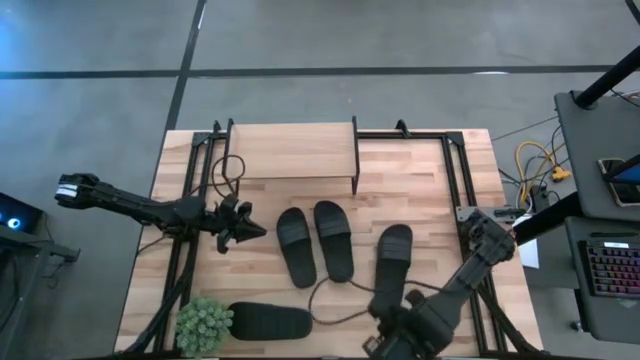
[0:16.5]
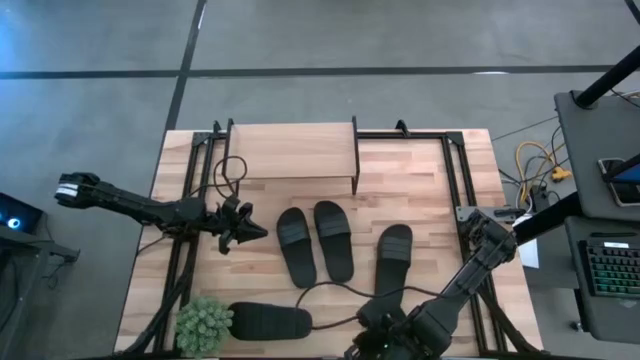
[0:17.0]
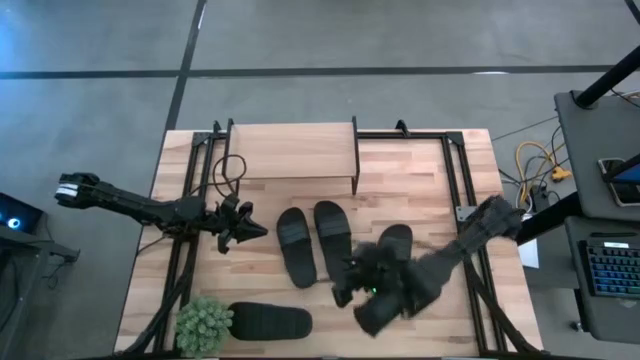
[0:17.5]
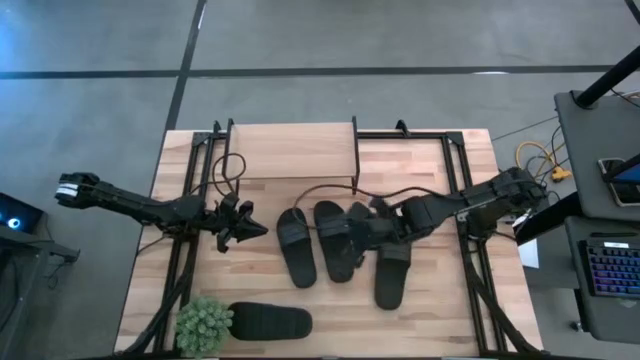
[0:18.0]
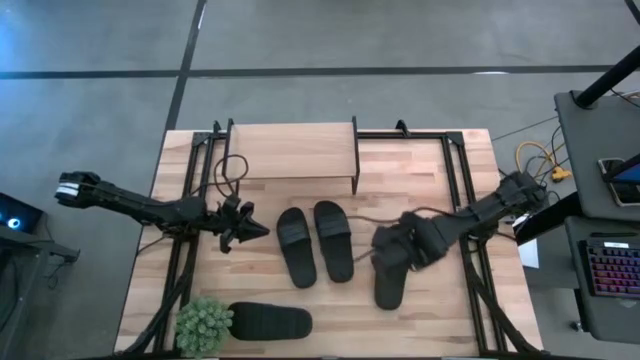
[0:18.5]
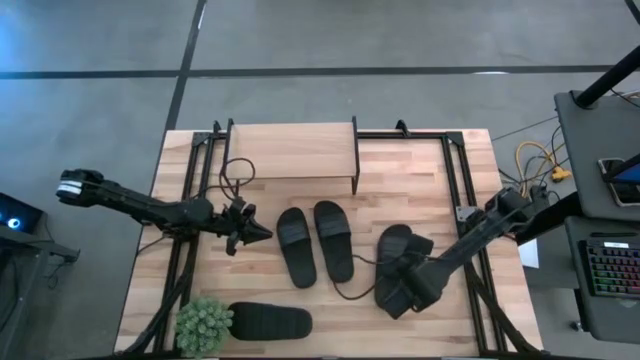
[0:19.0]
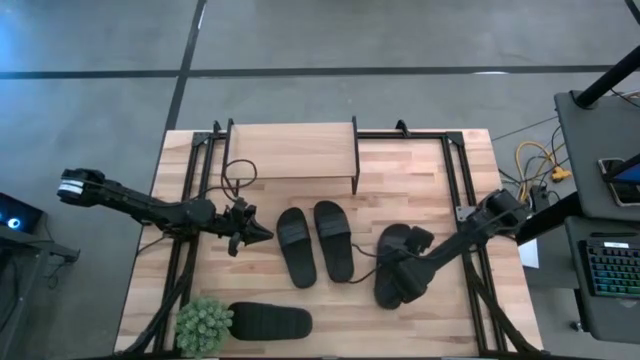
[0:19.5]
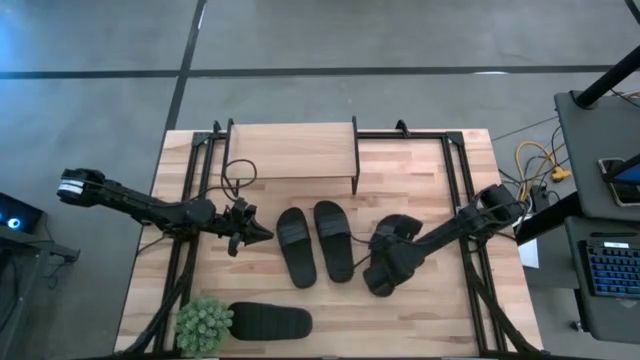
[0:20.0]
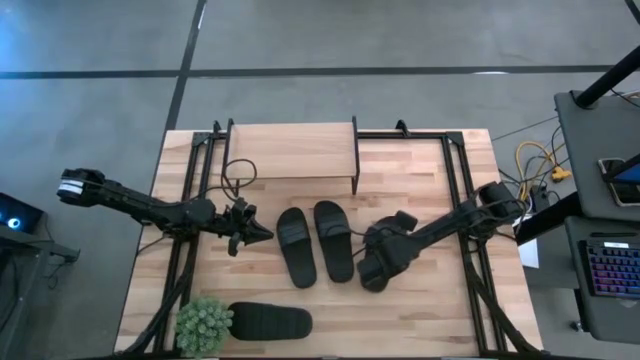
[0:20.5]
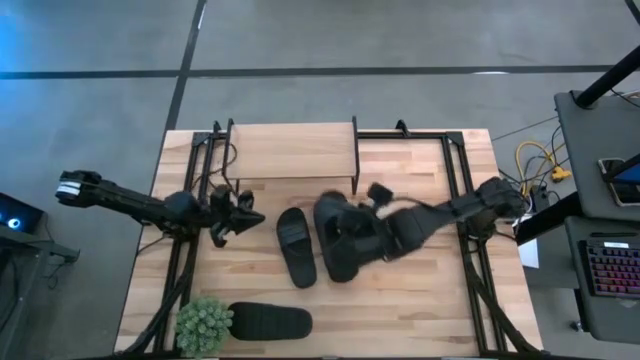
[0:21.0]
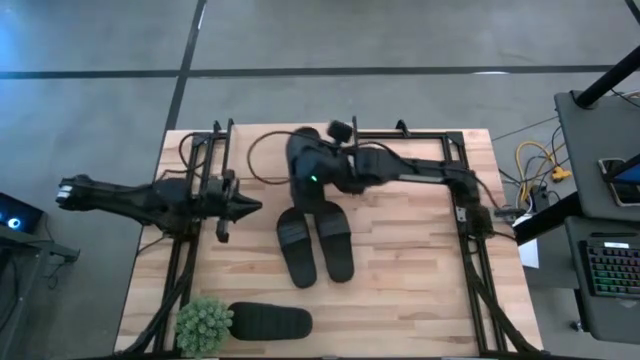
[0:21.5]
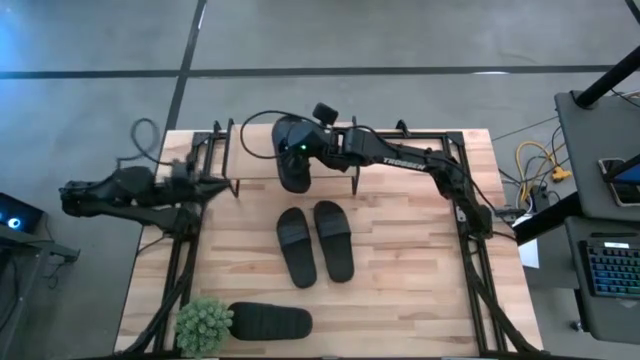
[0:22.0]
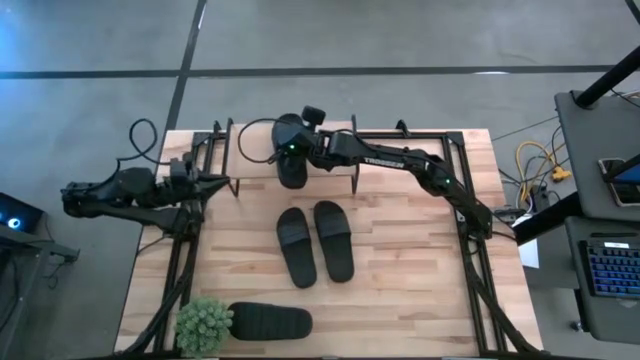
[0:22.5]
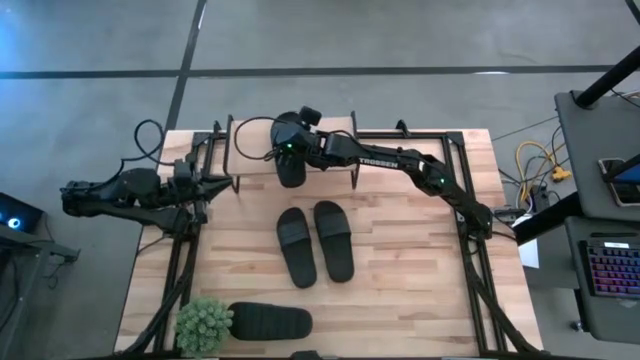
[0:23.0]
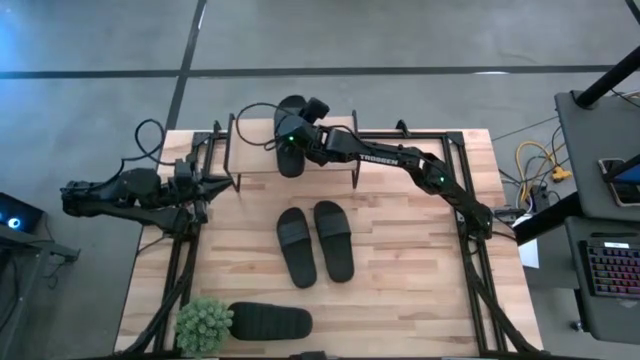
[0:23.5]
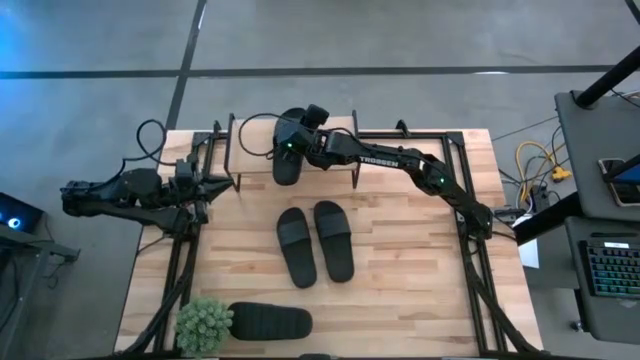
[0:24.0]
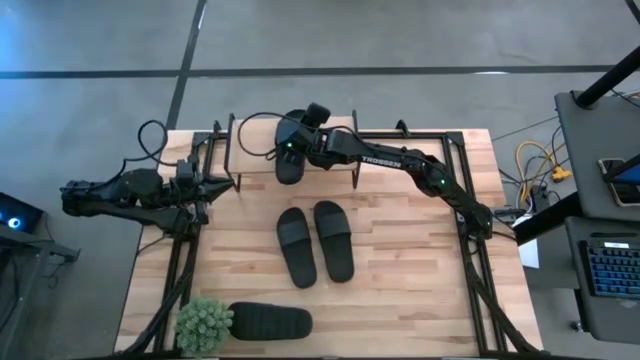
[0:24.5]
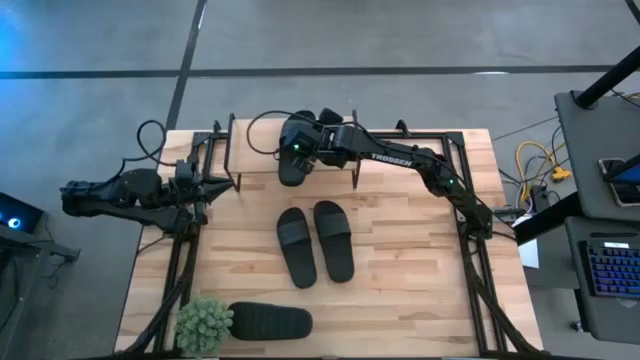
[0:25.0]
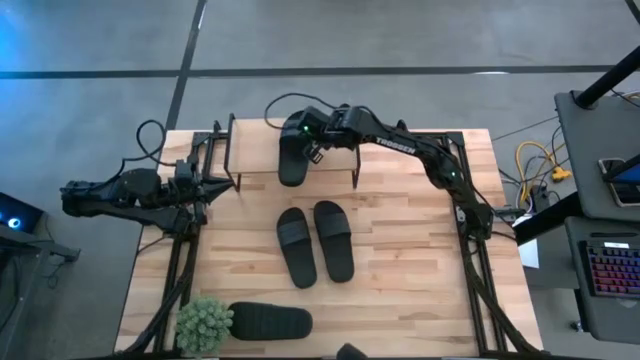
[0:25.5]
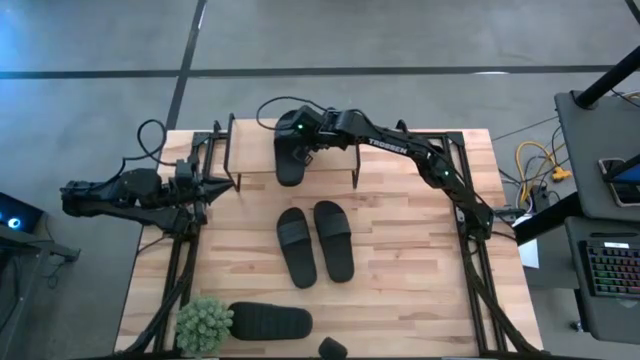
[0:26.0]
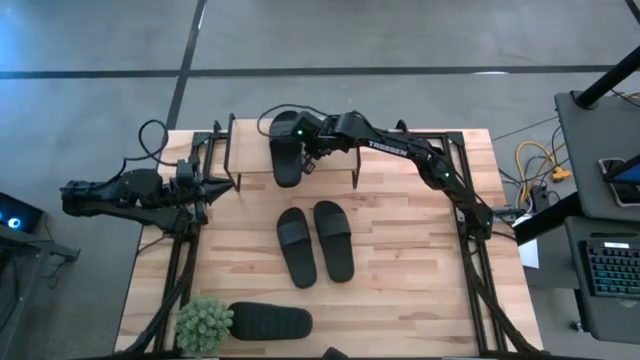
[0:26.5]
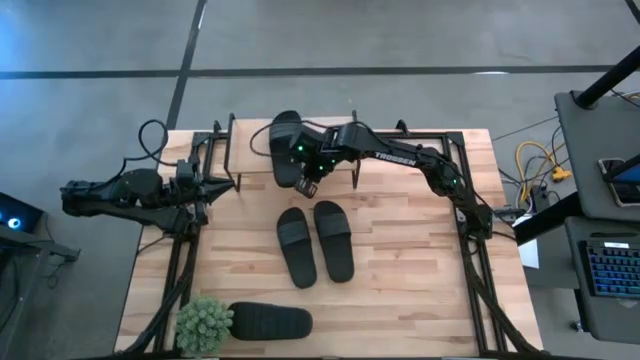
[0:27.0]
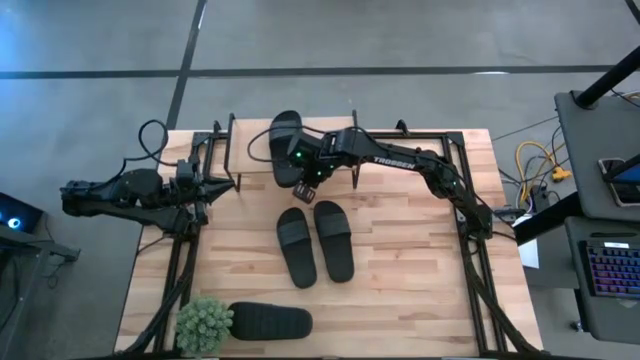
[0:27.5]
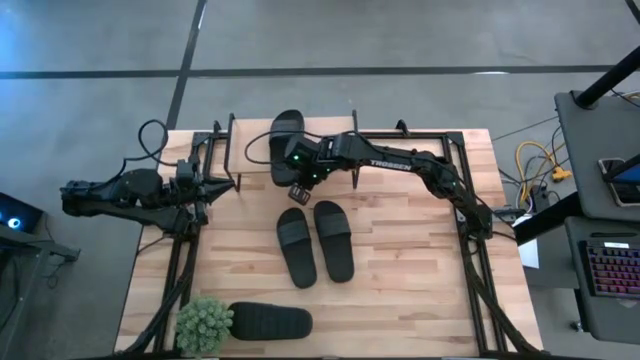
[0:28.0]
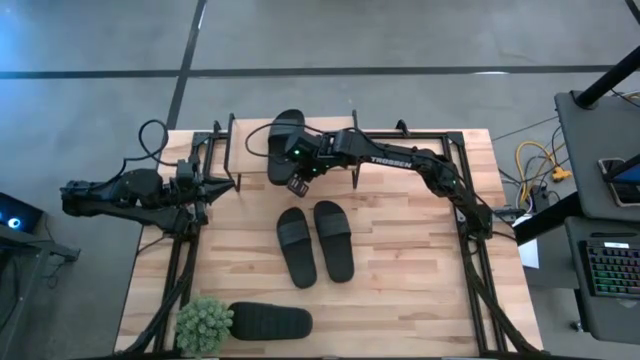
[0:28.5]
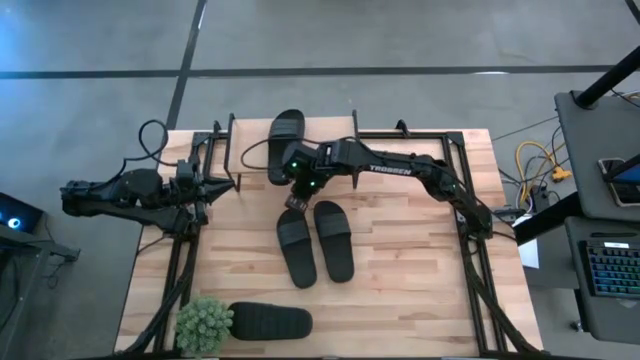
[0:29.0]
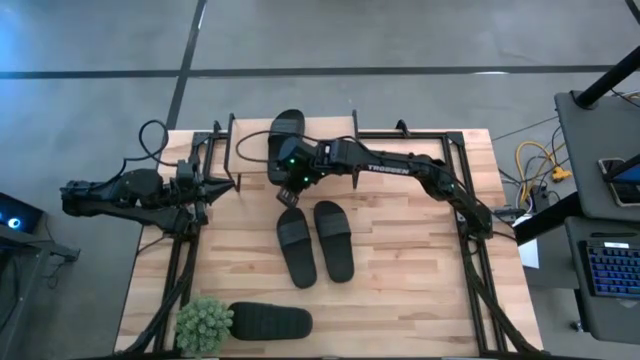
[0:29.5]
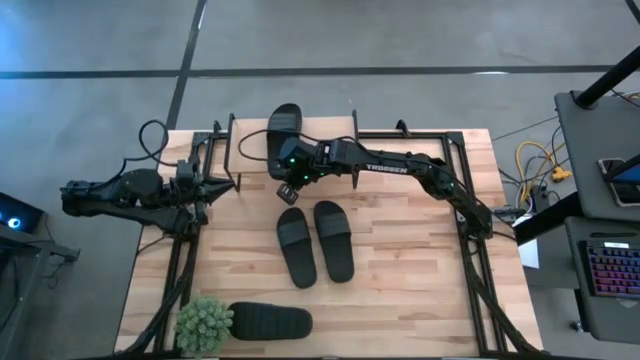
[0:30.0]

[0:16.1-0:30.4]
Task: Pick and place slides into the shelf
Put the black slide on the shelf

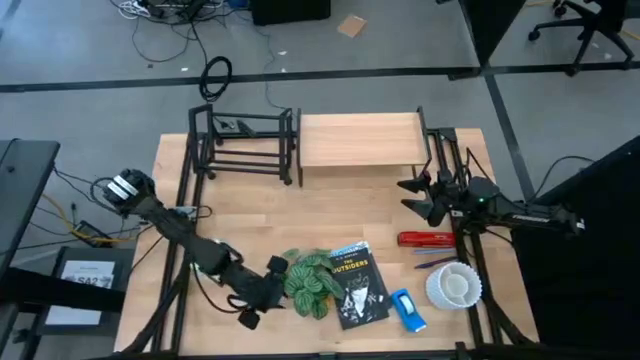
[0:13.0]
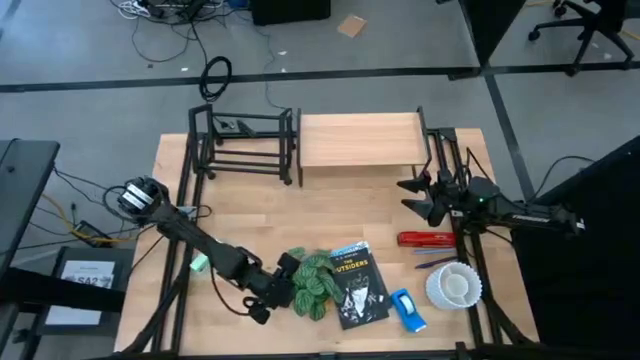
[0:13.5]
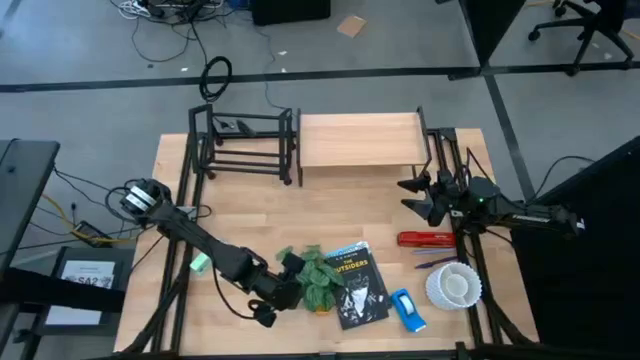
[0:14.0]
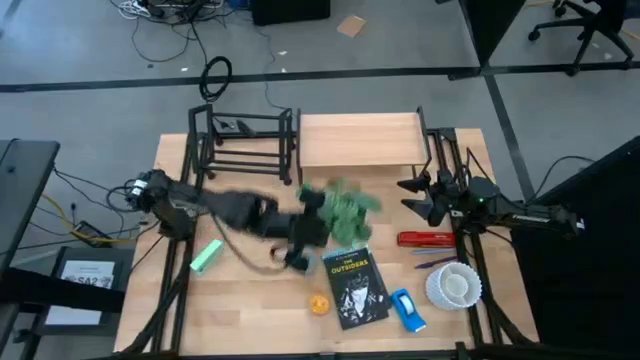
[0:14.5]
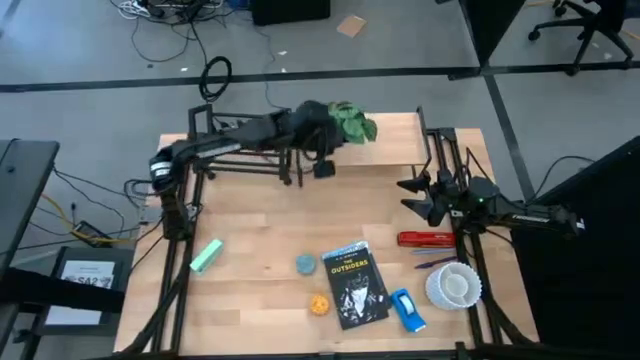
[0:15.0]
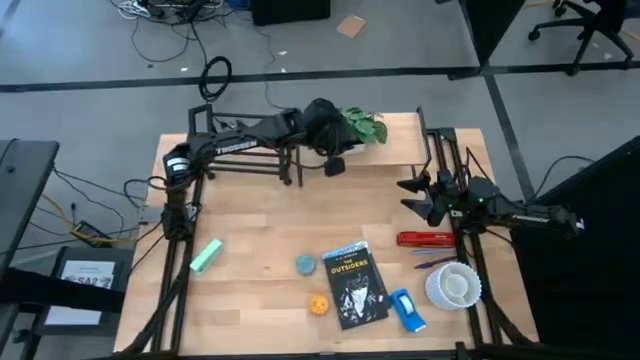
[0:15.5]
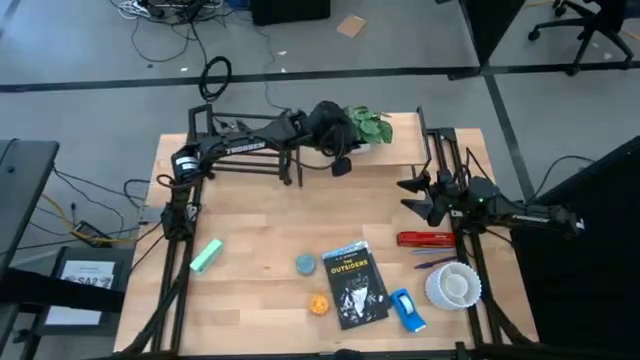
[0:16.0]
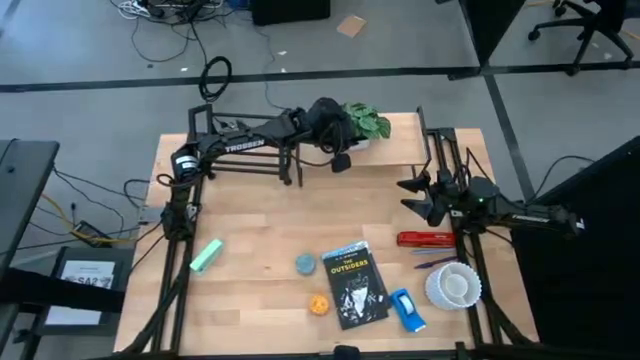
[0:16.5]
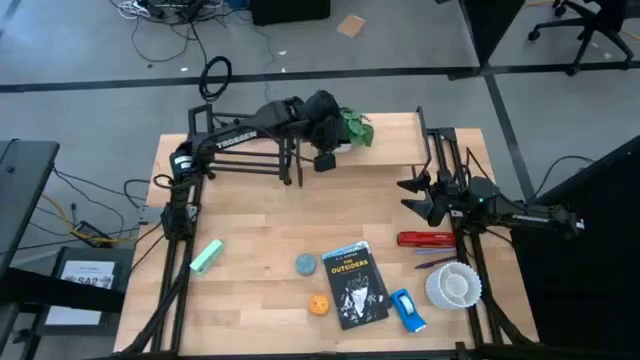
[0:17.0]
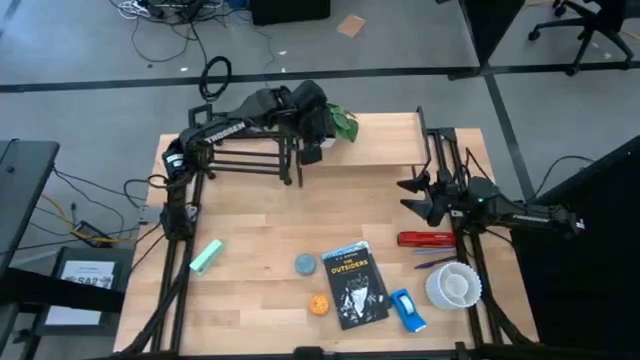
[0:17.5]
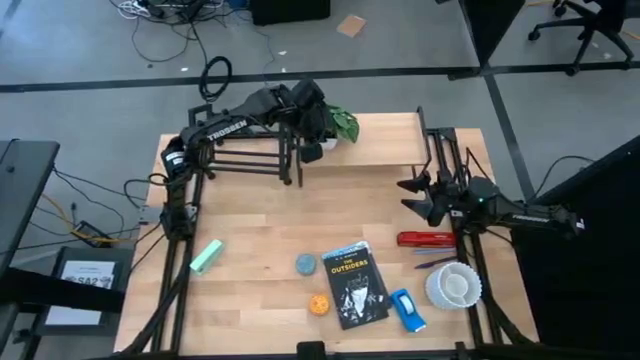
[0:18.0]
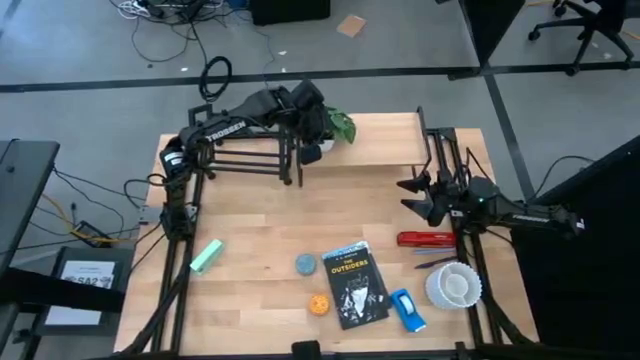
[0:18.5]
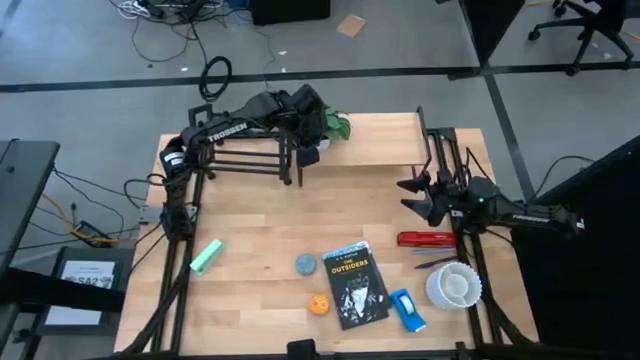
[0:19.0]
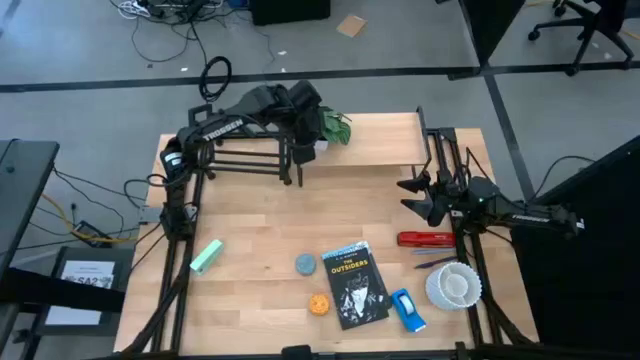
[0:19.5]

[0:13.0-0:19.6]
Task: Stock shelves
Put the flower pot on the shelf
